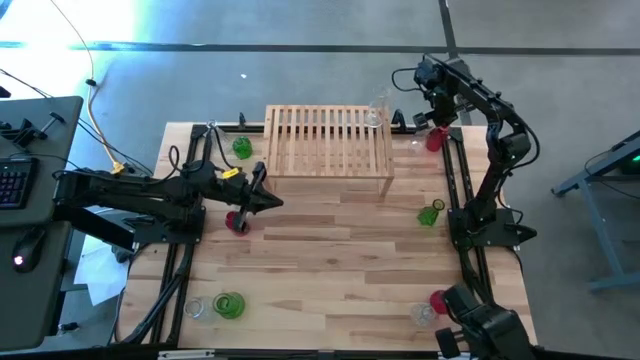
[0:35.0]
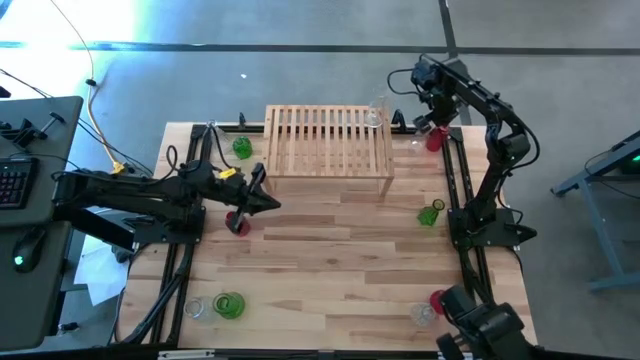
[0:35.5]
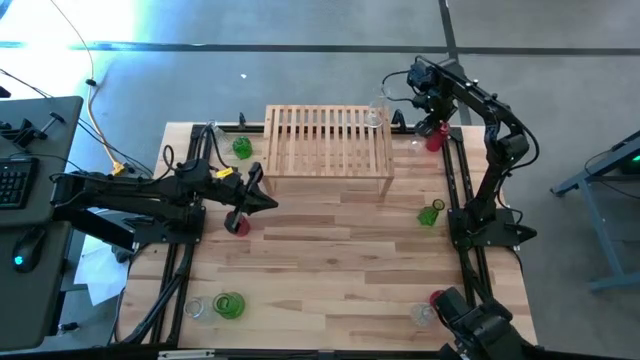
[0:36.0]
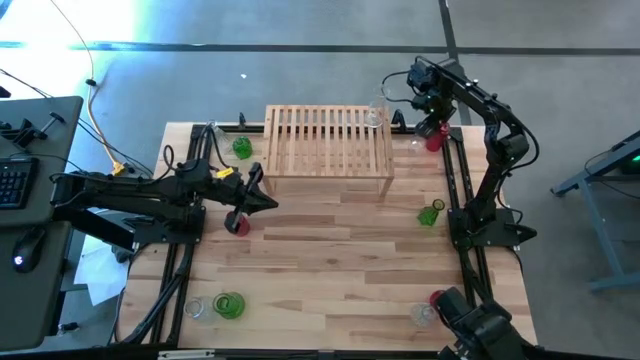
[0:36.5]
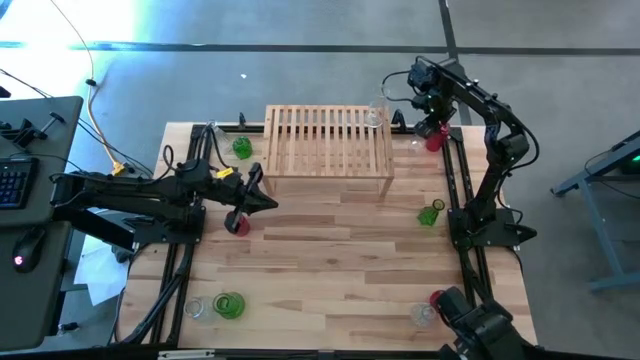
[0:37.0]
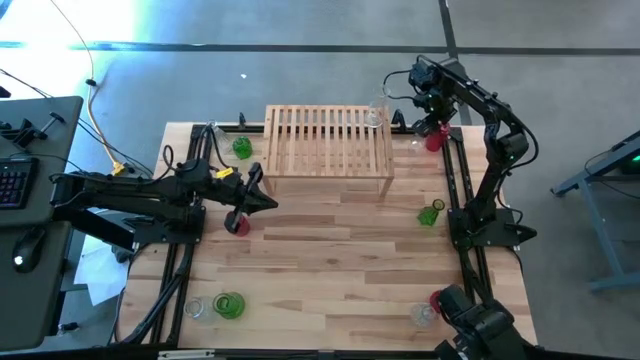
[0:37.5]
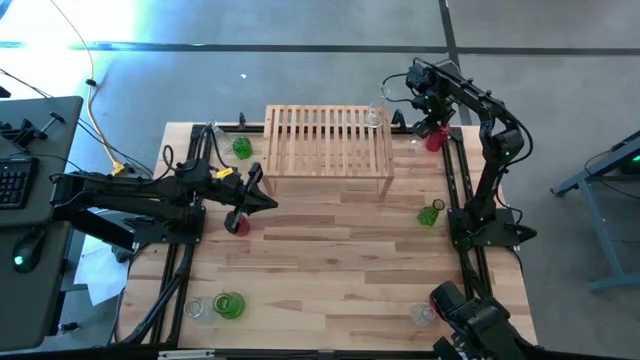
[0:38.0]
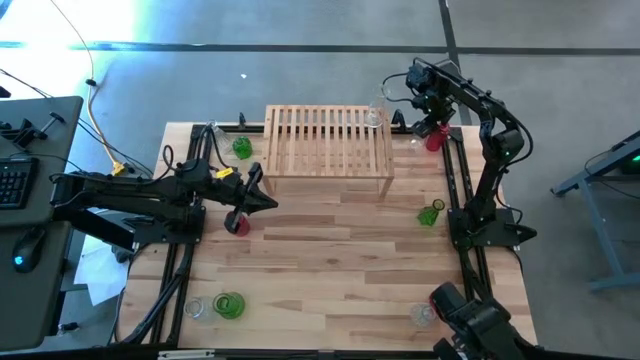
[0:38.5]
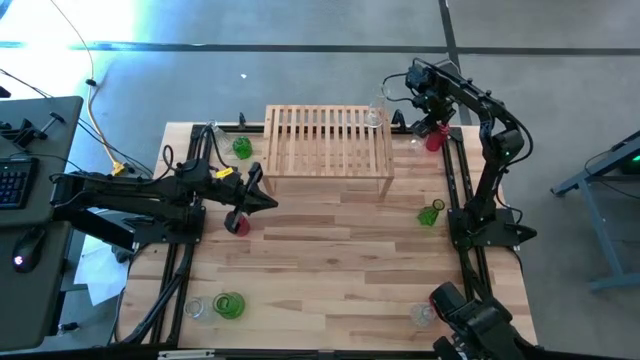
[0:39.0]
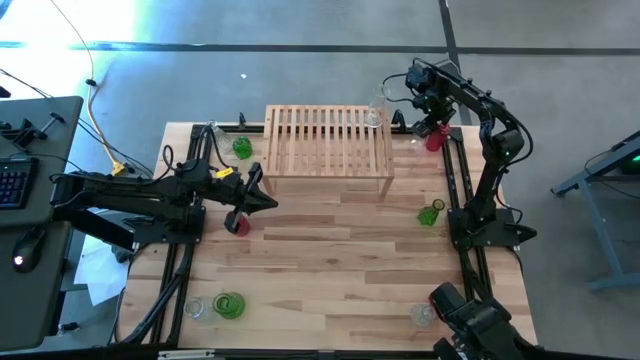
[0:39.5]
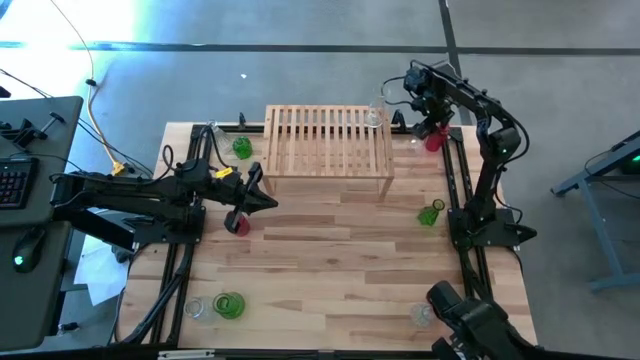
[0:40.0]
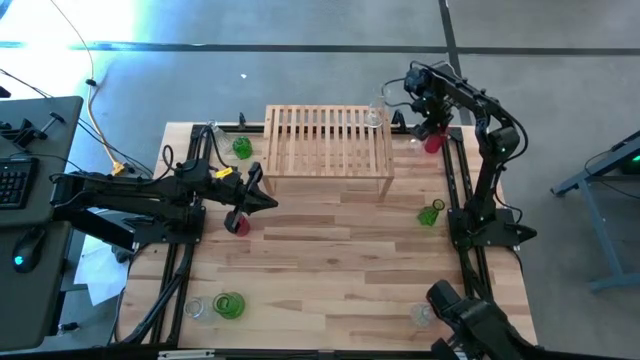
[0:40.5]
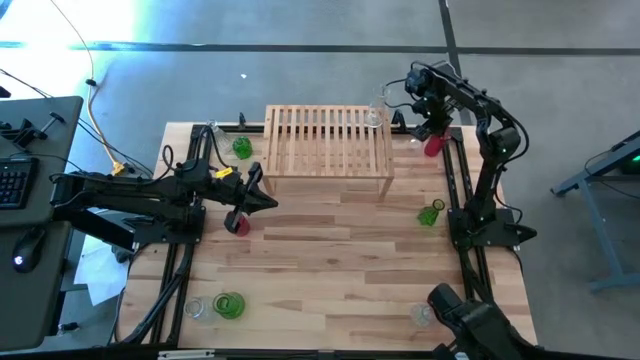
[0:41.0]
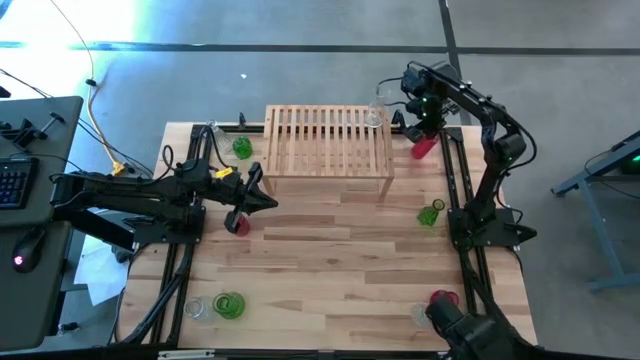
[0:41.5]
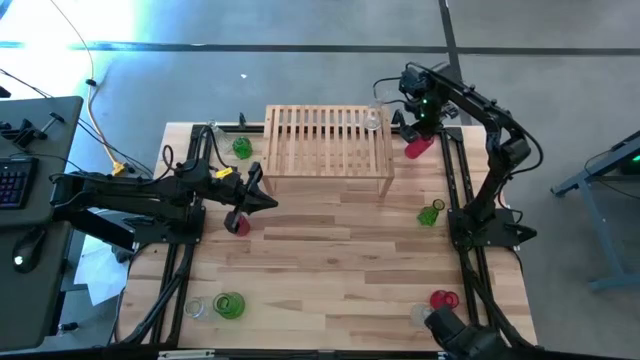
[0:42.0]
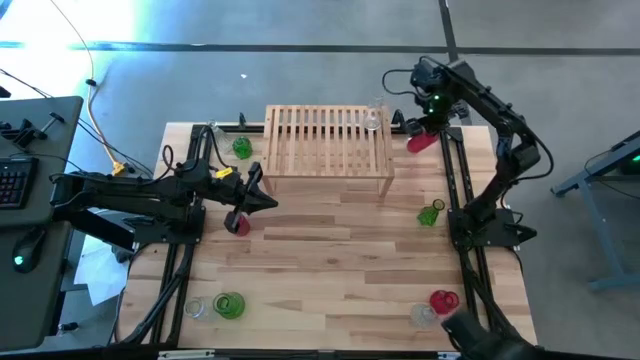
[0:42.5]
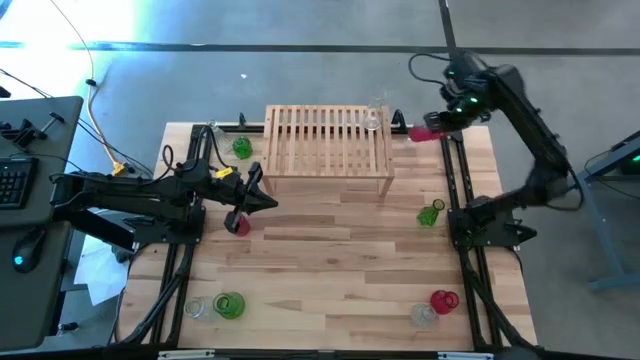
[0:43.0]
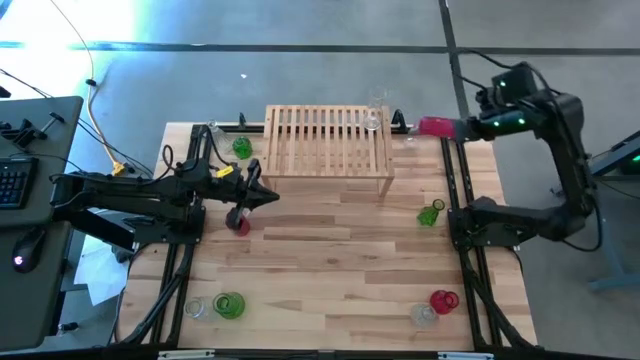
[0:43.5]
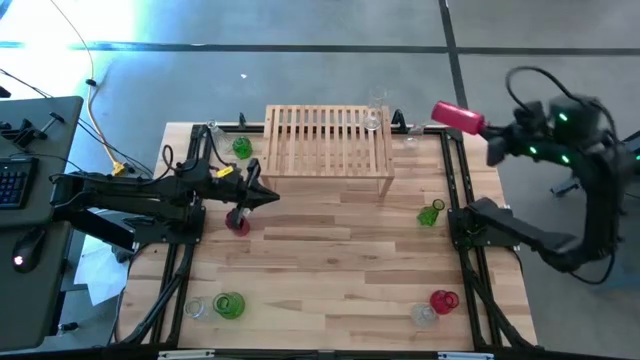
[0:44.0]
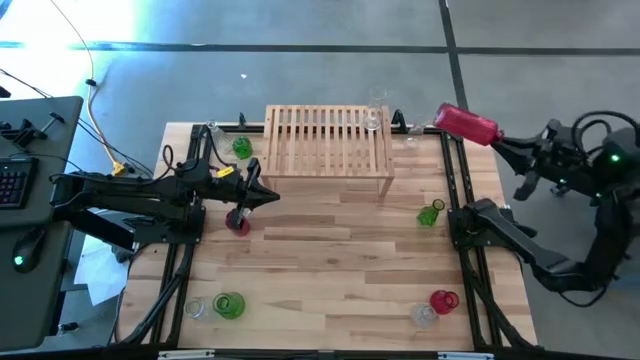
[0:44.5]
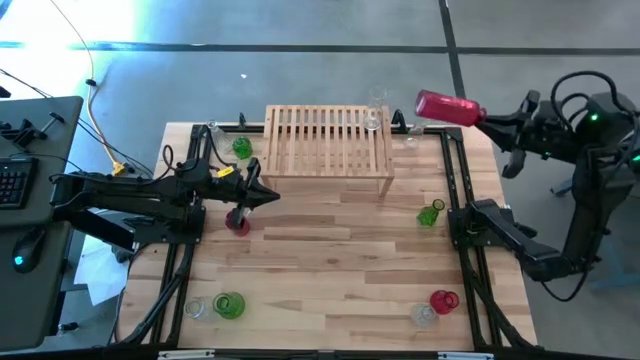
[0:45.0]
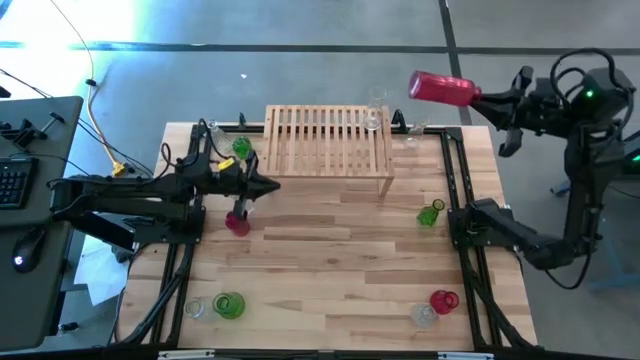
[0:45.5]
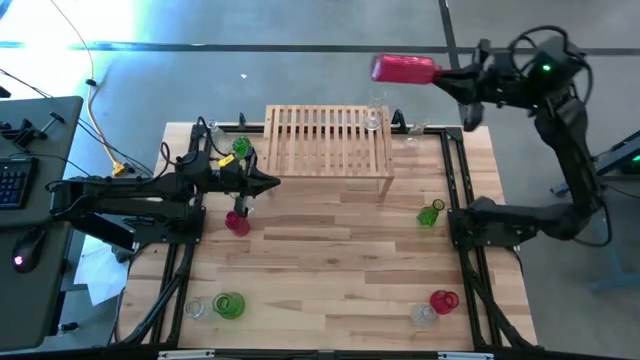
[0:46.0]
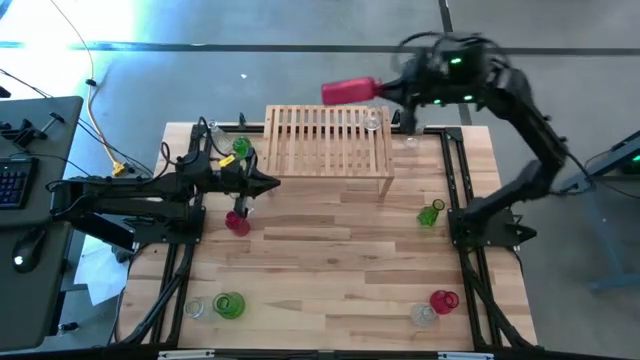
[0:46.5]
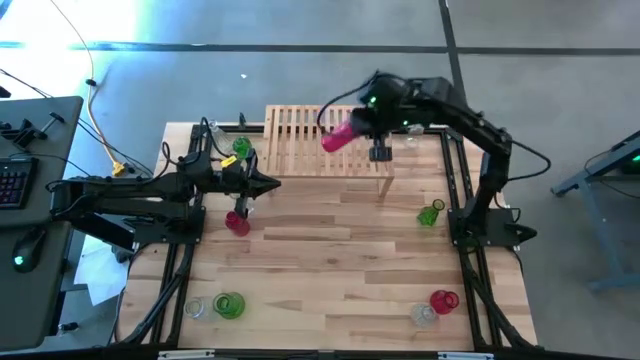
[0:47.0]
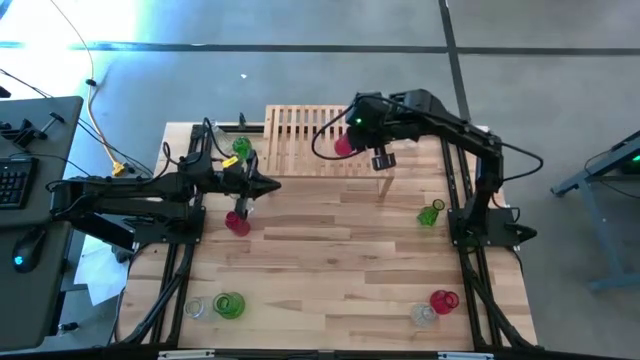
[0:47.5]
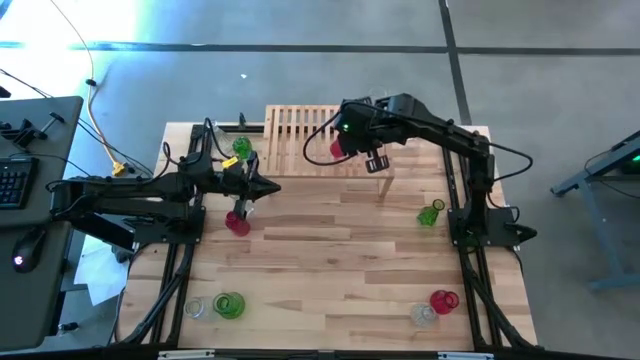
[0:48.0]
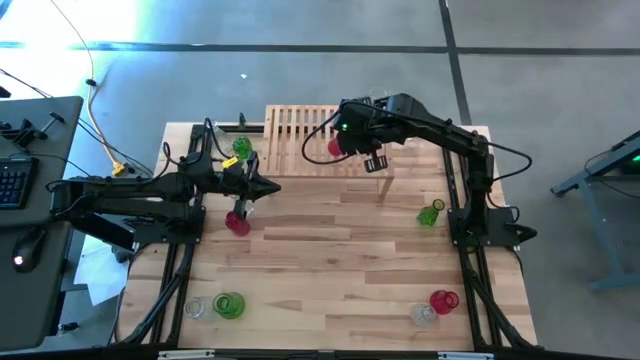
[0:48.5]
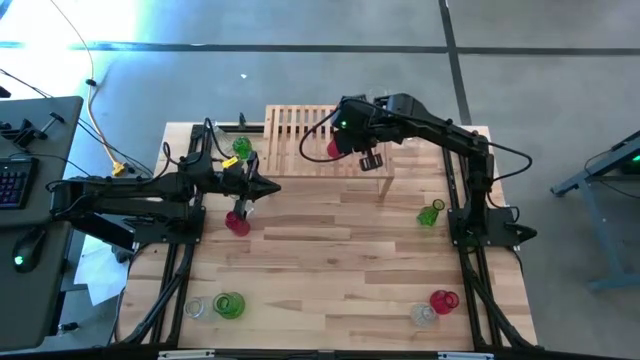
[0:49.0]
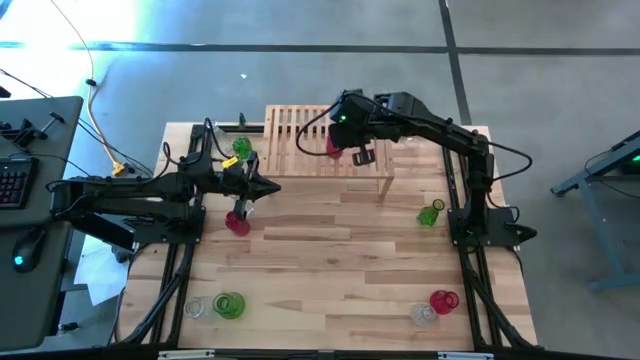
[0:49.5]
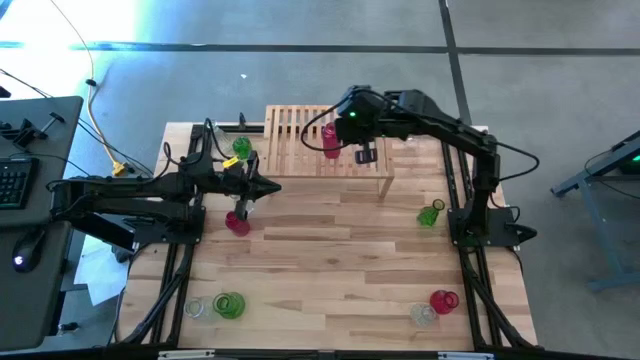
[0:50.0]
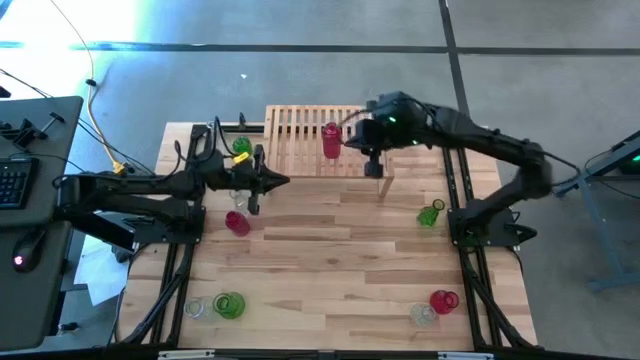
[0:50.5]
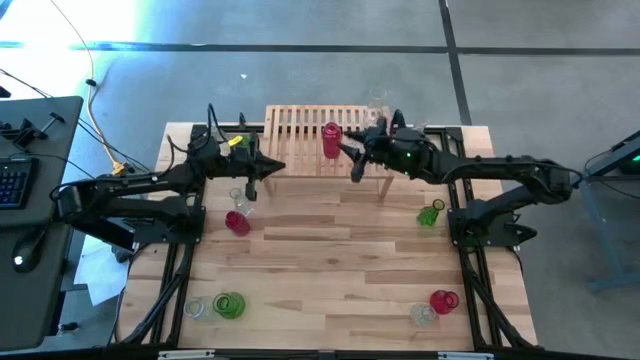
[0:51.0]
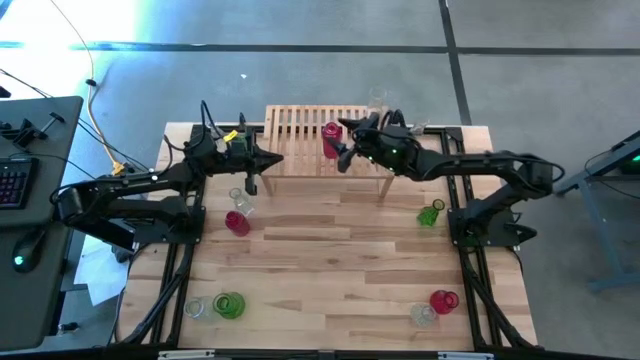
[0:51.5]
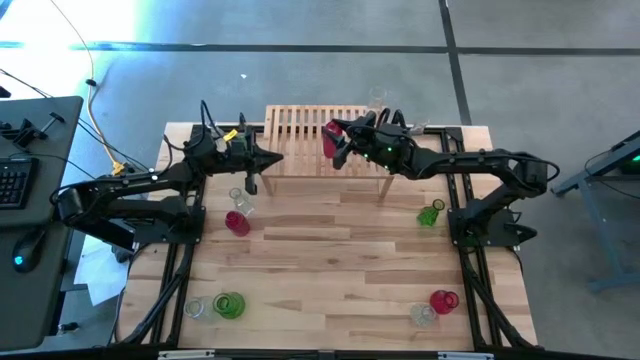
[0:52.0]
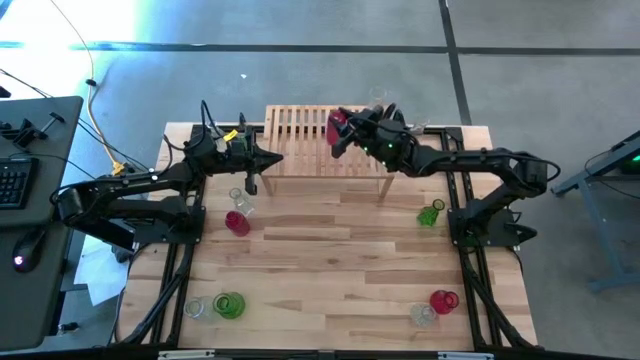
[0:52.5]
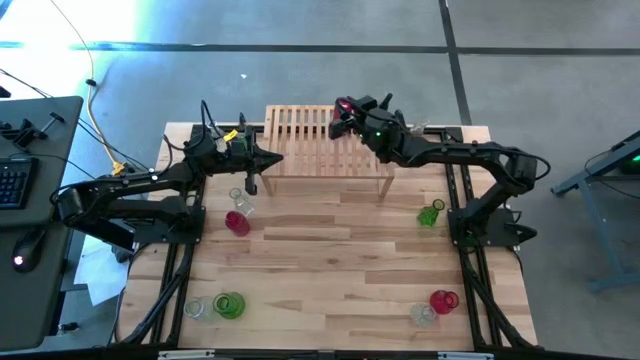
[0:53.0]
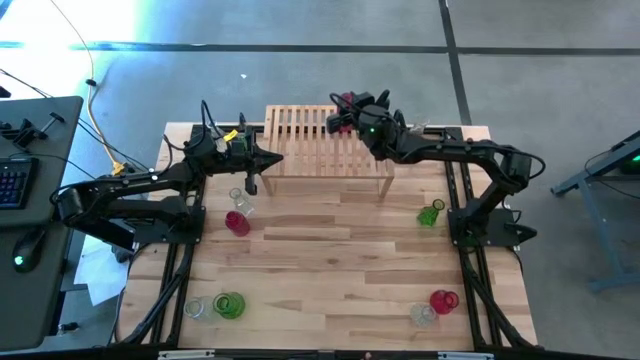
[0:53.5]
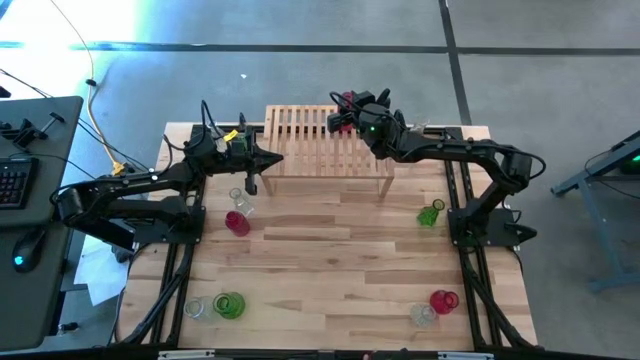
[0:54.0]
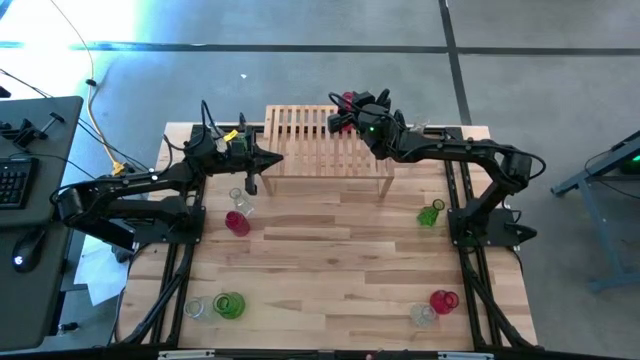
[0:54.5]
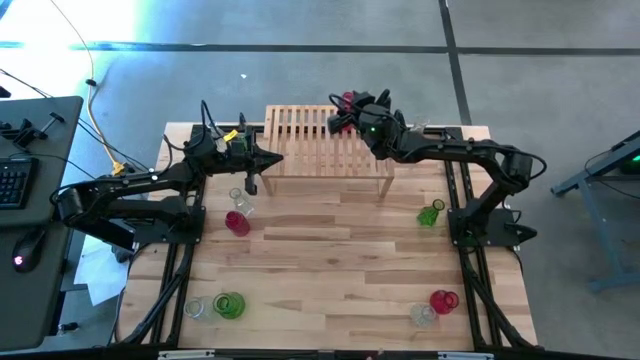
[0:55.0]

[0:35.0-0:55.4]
Task: sort vases onto shelf
Put the red vase on the shelf

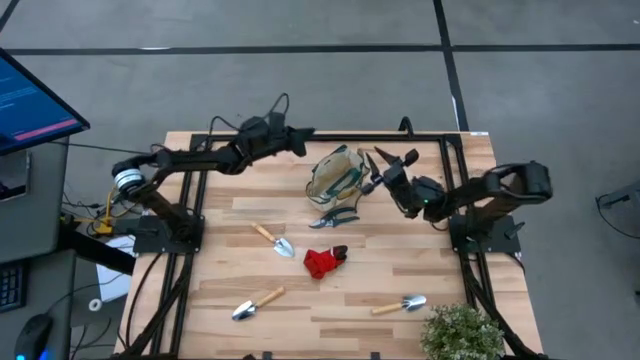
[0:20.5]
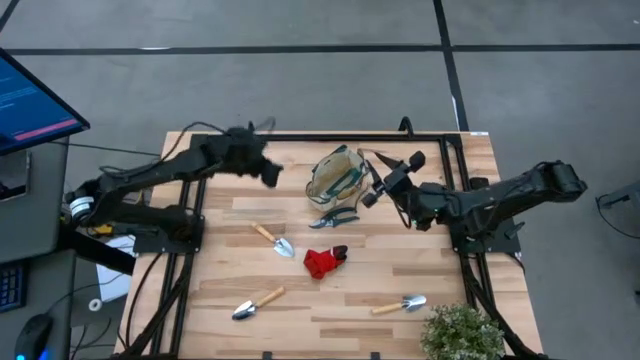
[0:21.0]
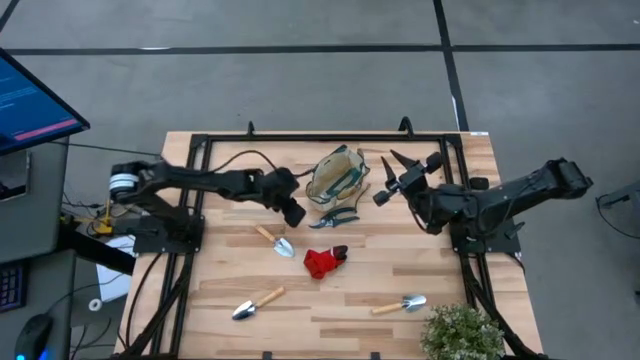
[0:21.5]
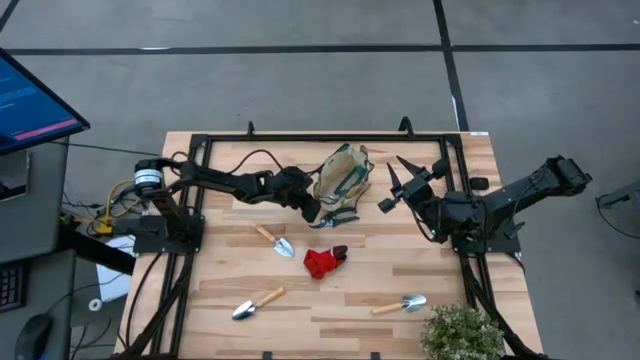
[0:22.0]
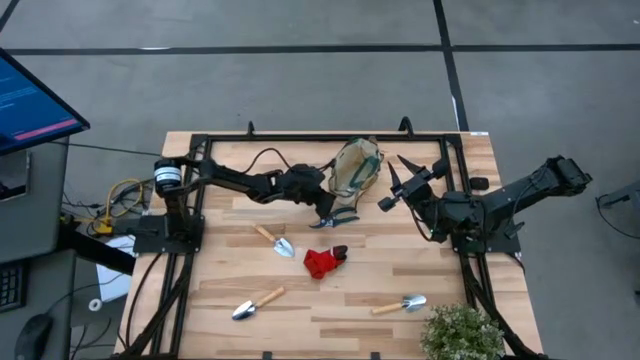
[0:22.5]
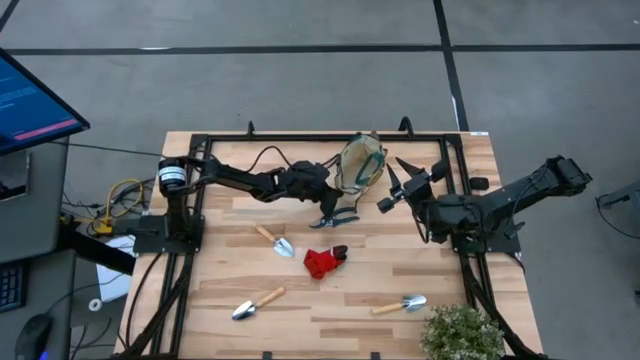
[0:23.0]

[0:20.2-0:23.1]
Task: Pick & Place Garden tools in Gardening bag
Adjust the gardening bag
